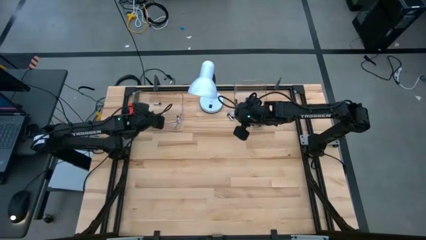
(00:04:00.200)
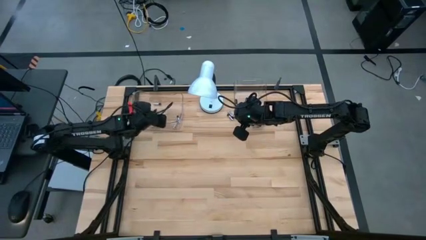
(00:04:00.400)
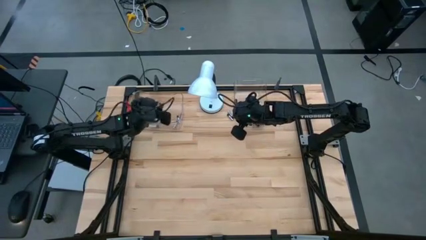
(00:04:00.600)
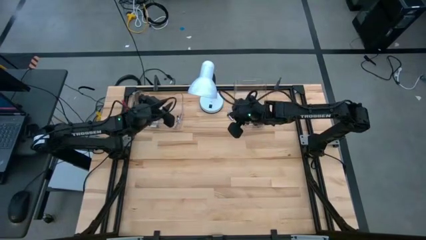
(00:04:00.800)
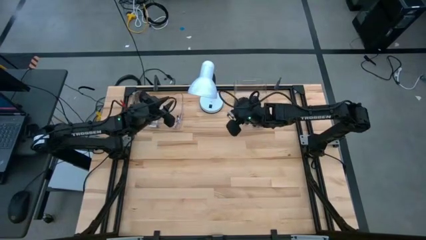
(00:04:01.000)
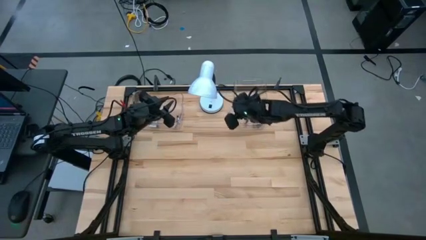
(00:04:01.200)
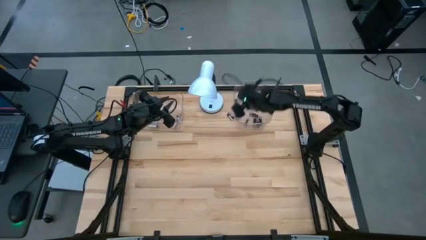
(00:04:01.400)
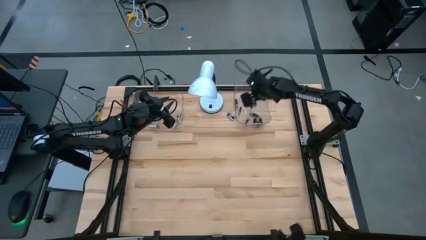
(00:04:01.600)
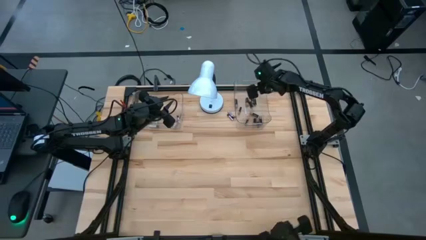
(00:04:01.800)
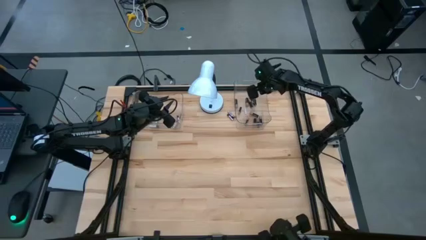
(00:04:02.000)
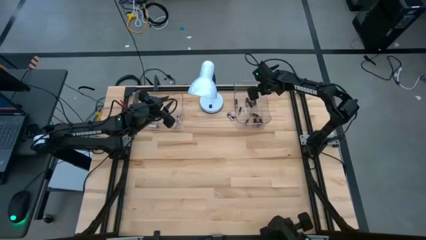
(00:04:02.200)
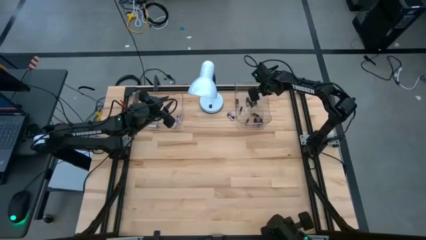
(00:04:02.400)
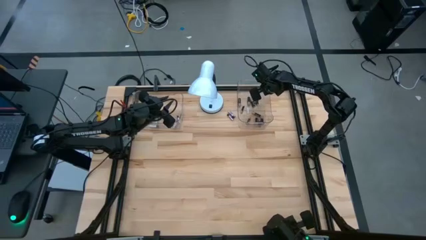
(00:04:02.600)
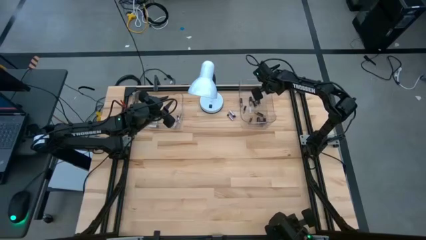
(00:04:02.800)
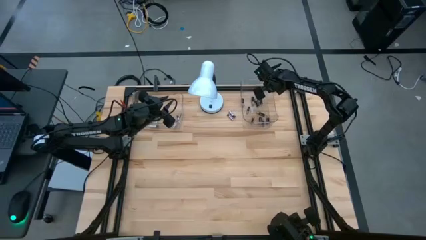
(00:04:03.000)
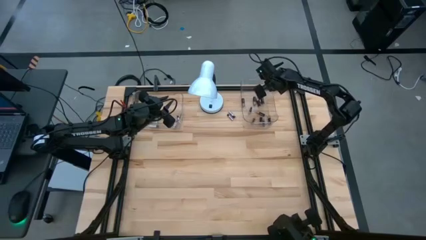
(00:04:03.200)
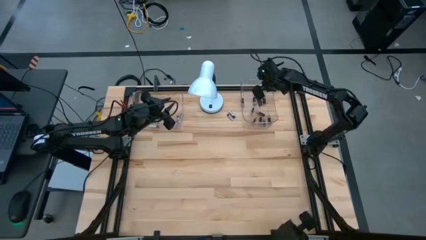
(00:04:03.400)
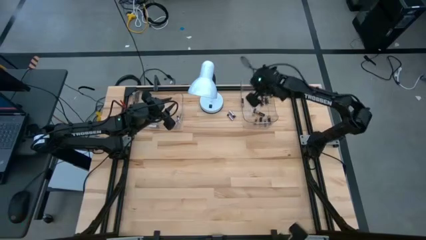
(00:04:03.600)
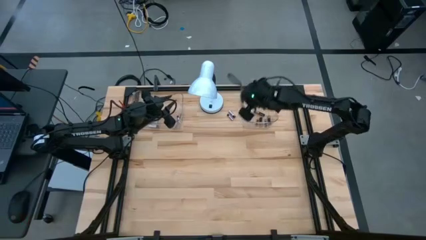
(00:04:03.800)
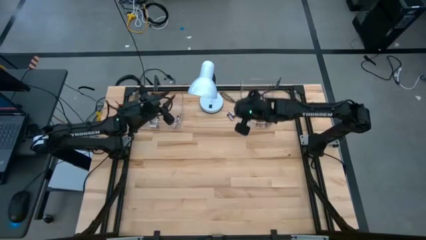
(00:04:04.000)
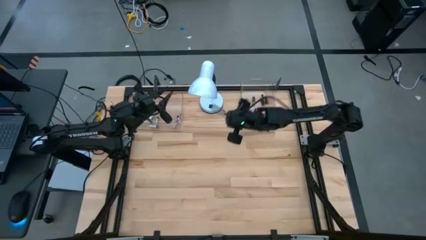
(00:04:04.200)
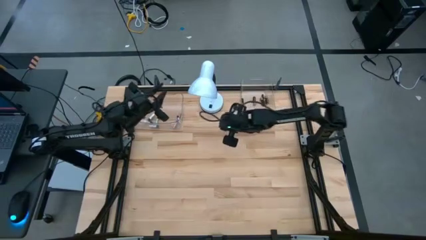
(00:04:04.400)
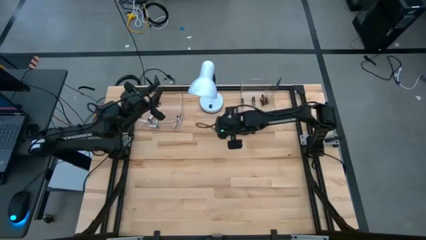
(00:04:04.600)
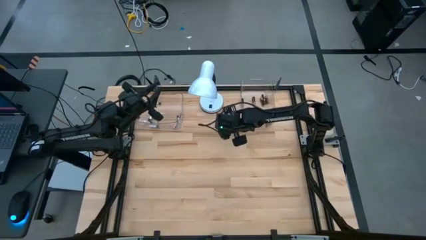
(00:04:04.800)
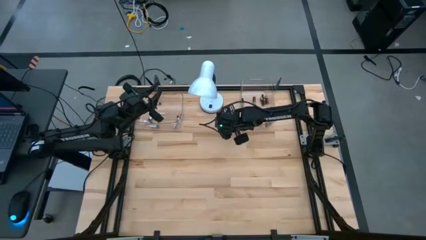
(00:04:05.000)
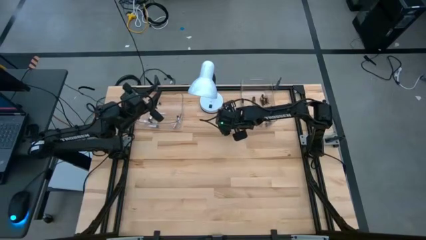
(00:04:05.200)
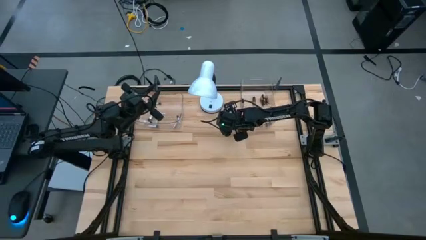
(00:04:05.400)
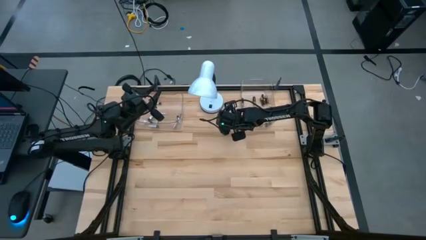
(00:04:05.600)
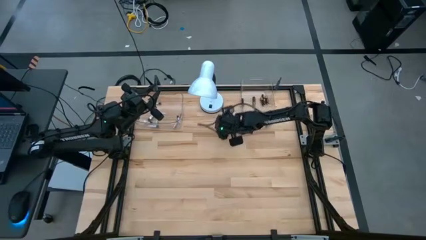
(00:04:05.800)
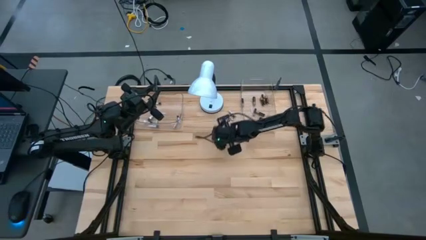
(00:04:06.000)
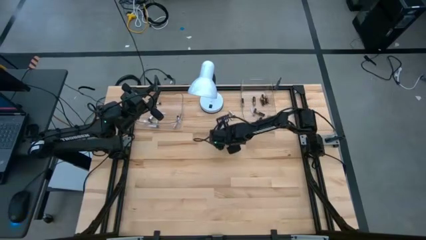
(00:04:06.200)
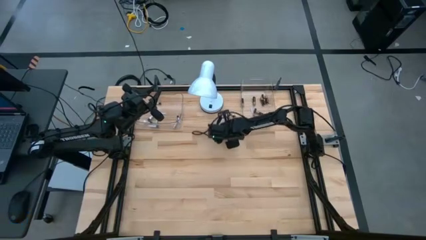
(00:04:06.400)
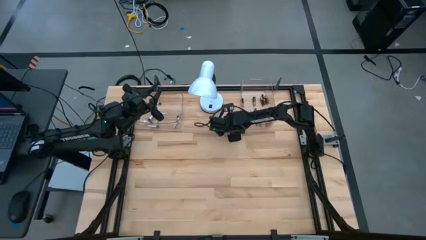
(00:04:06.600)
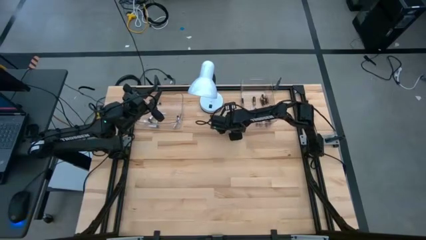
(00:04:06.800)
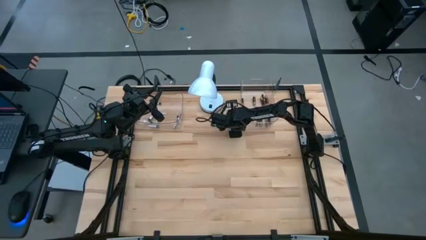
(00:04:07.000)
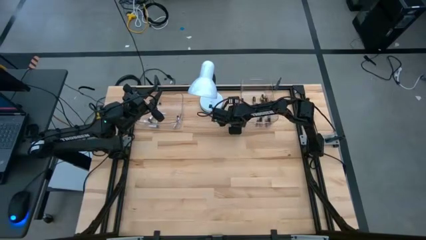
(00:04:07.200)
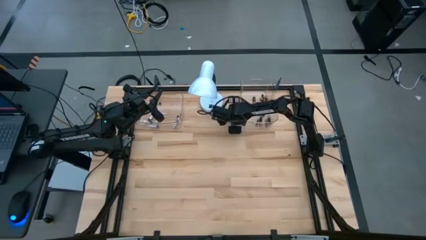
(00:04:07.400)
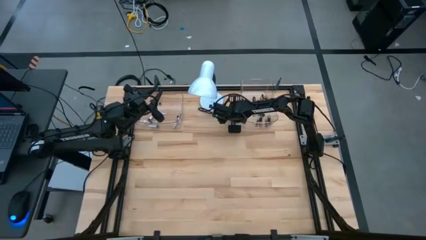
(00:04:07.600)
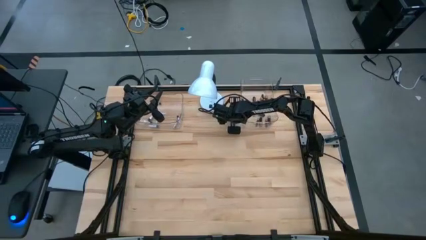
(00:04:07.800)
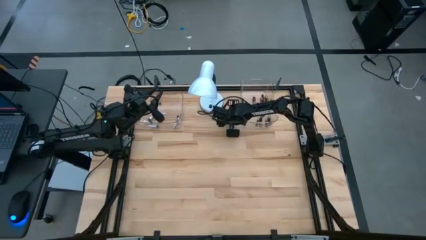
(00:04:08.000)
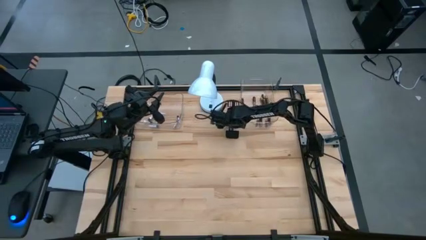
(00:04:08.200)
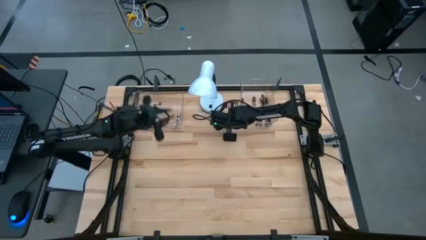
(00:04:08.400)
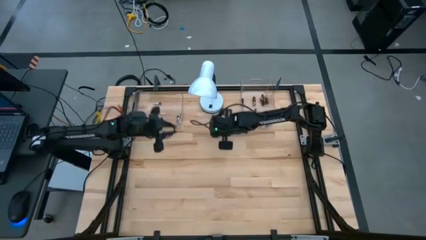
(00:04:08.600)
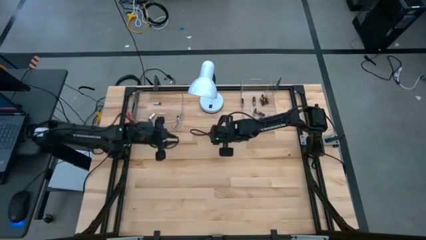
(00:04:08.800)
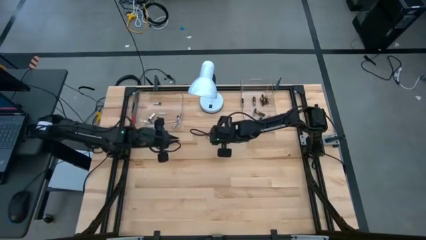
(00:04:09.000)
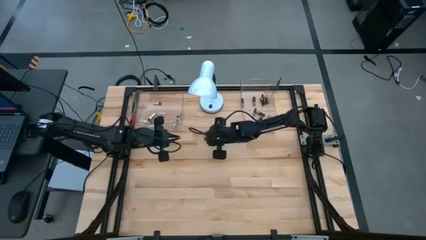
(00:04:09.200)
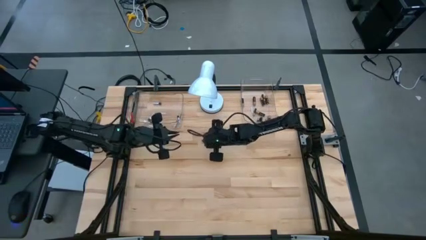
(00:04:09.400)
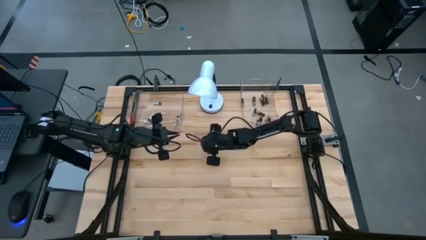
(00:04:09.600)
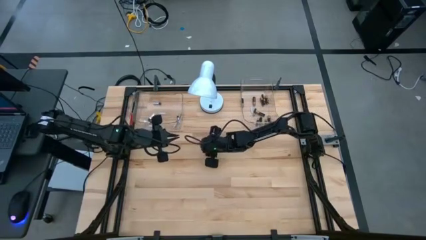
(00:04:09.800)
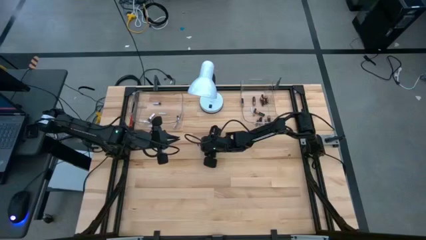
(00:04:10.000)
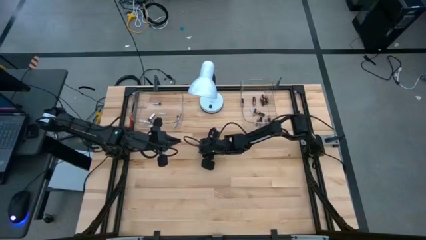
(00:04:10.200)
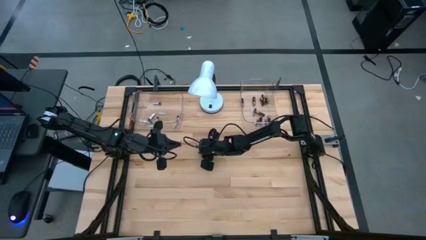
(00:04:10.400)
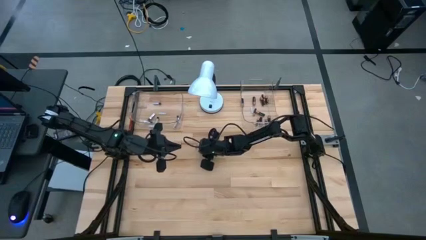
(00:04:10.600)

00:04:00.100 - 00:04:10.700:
Task: Sort batteries
Put the silver battery in the transparent bin

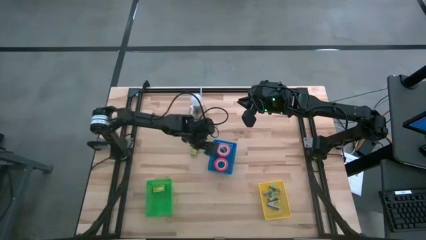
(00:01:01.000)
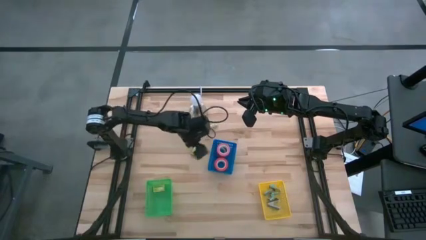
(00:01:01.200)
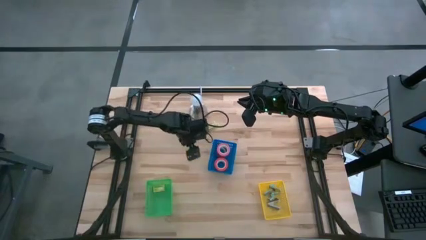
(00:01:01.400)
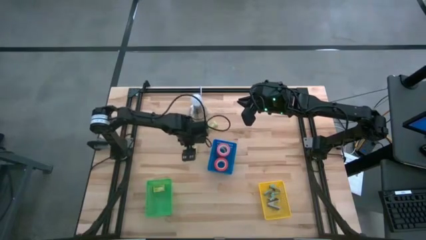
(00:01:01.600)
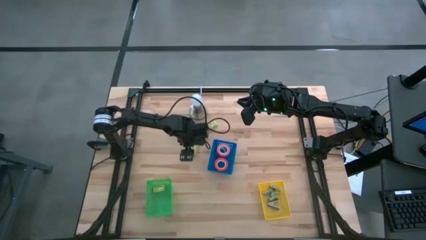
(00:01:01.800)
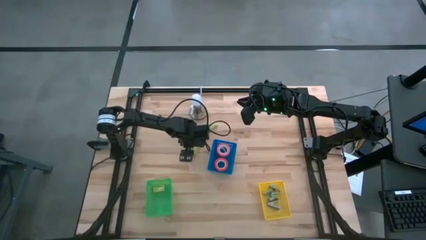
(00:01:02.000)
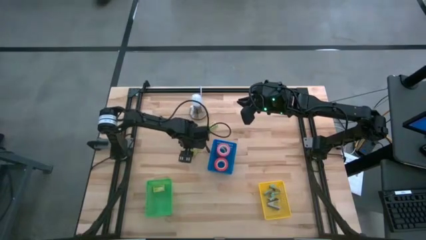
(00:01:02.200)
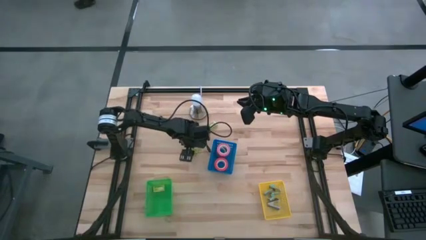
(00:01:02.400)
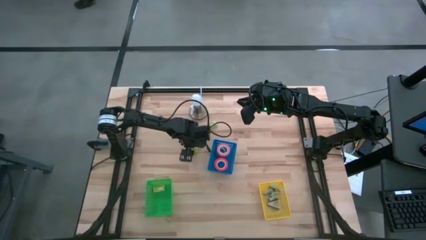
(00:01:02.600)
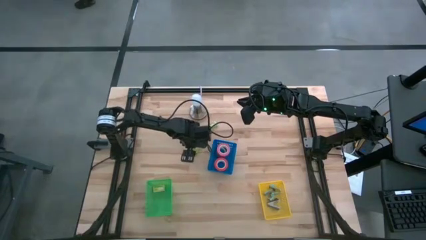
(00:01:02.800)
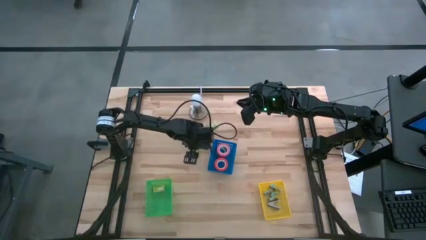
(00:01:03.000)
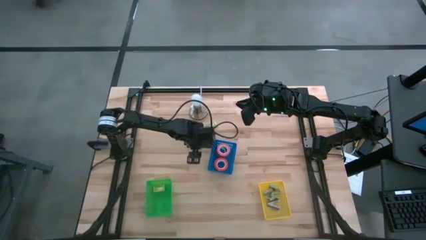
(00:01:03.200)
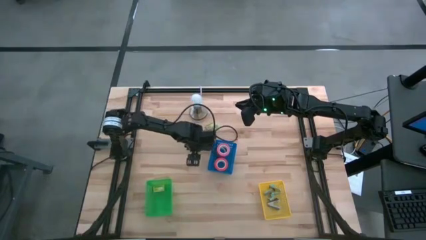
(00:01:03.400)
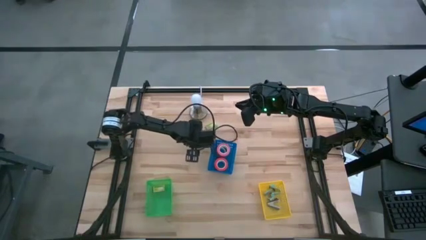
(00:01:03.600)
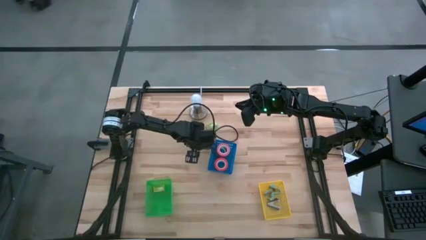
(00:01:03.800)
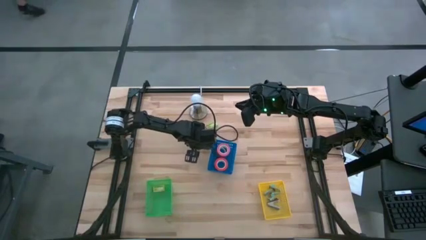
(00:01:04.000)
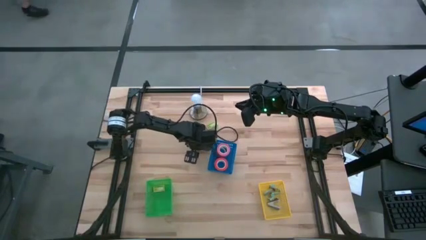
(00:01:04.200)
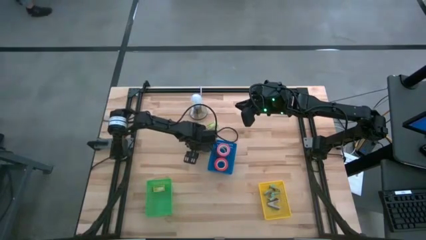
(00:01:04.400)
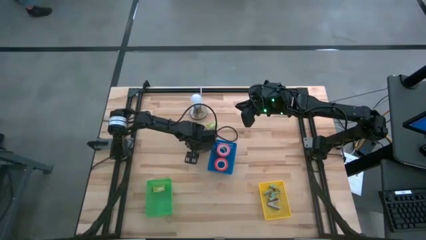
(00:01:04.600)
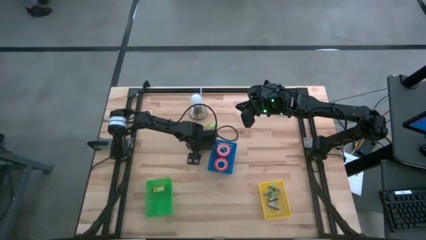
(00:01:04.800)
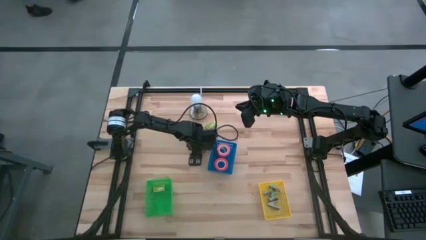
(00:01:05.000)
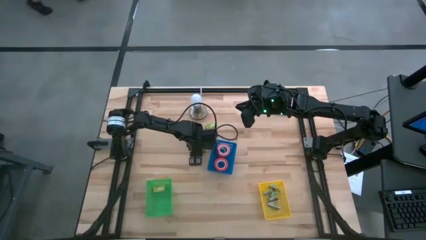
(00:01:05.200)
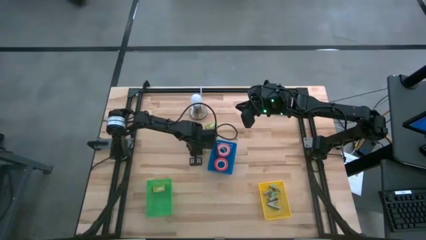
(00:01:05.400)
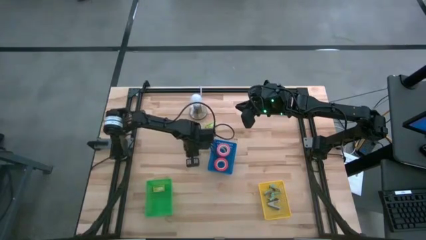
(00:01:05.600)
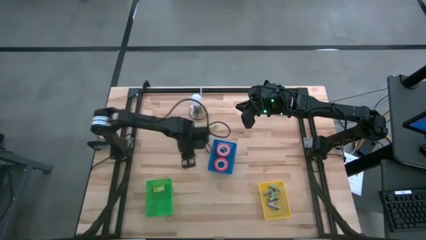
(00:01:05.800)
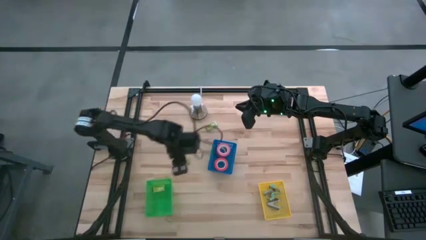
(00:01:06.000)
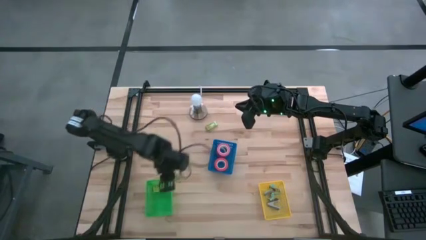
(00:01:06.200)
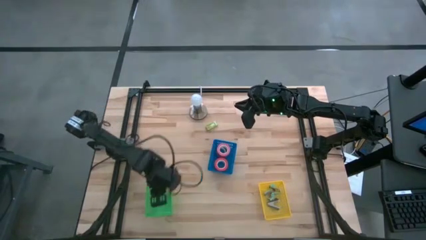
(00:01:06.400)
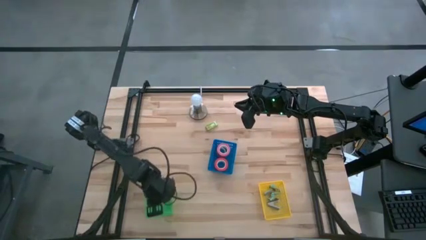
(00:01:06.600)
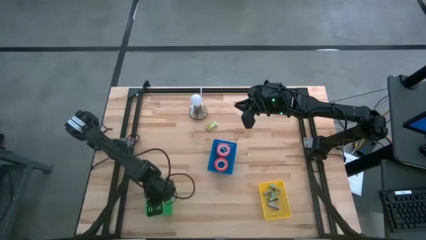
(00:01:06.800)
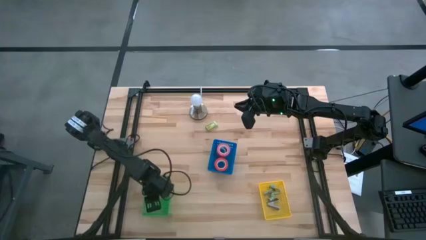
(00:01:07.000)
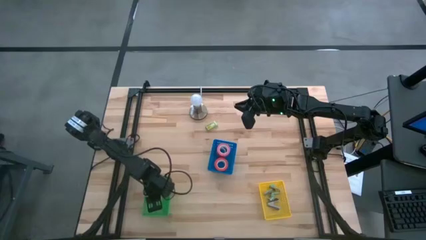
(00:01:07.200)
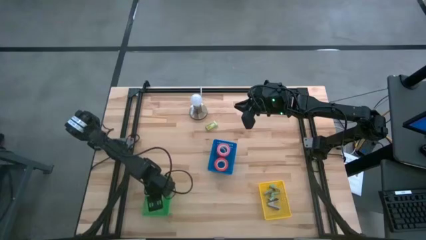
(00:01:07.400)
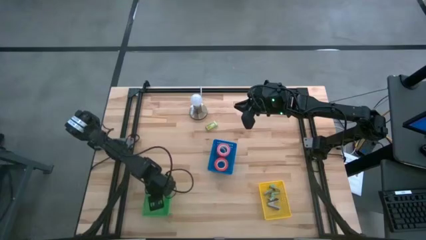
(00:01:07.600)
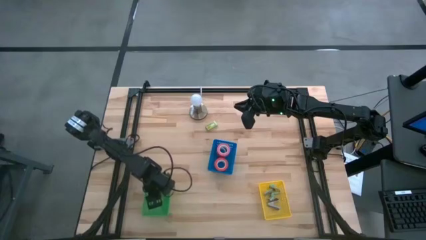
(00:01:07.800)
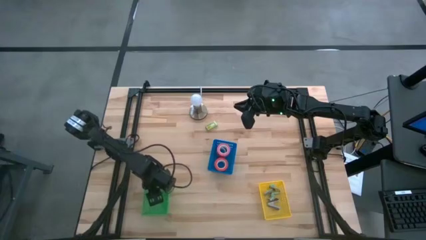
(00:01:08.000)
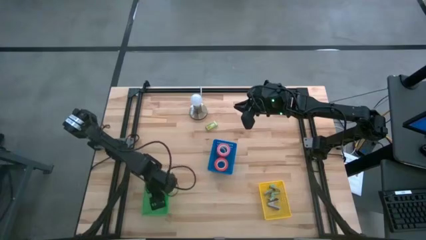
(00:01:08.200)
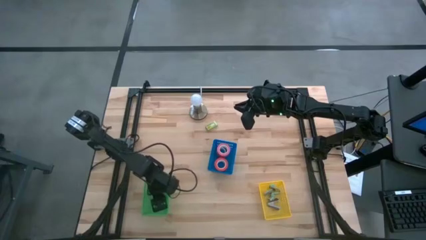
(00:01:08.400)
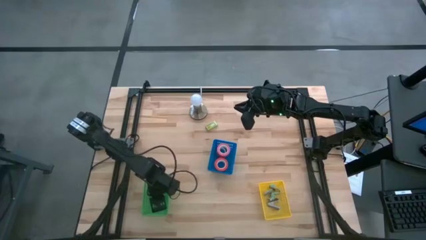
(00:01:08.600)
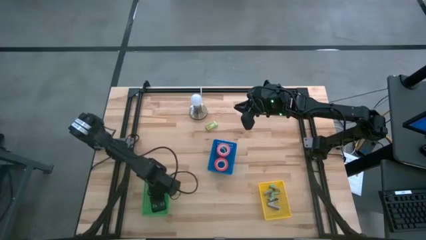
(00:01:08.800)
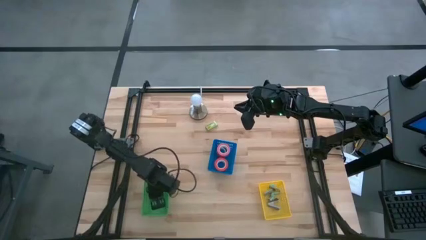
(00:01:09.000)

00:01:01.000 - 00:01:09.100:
Task: Pick and place Stapler, Stapler remover, tape
Put the bottom green staple box into the green bin
